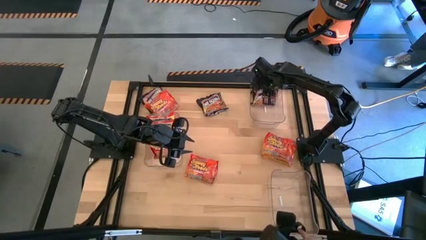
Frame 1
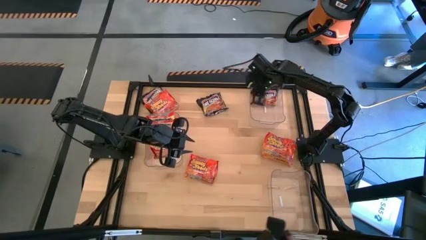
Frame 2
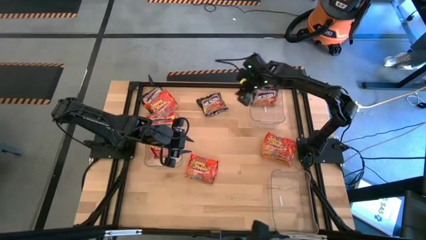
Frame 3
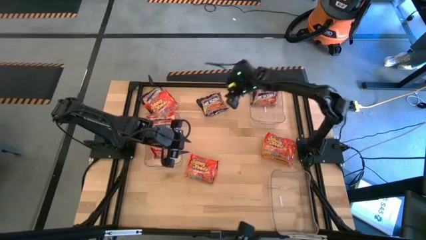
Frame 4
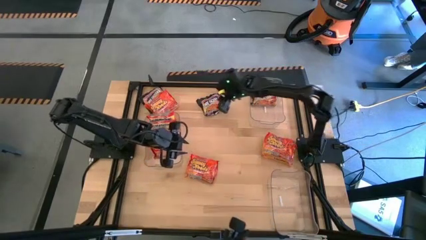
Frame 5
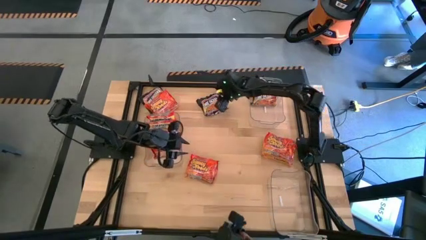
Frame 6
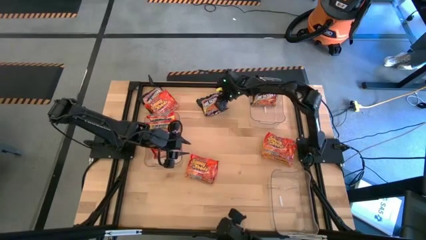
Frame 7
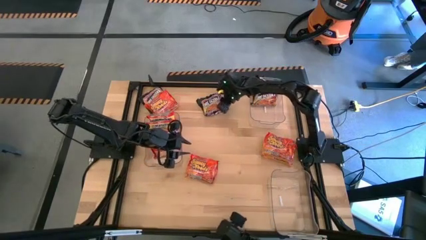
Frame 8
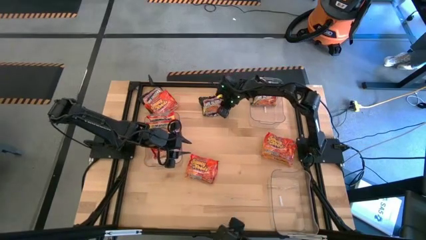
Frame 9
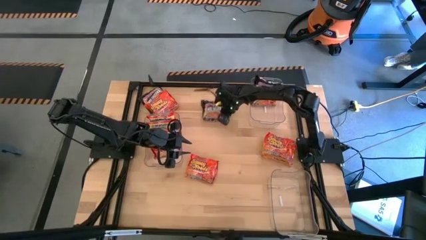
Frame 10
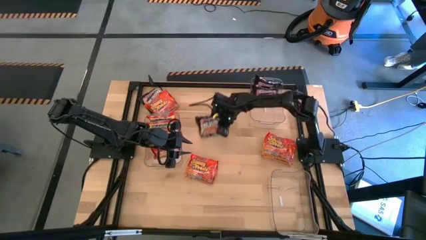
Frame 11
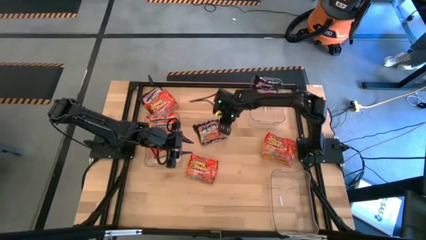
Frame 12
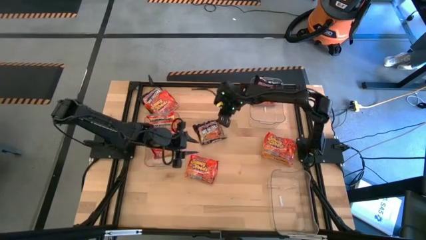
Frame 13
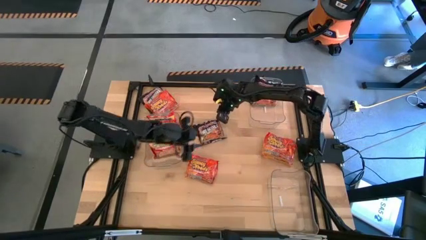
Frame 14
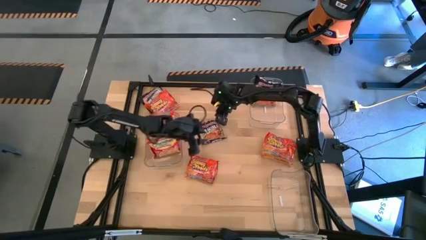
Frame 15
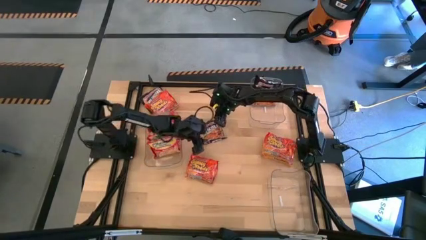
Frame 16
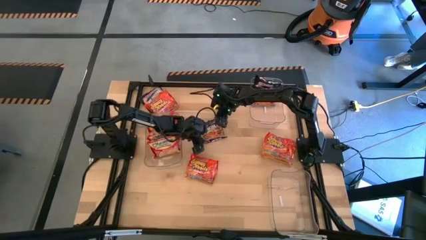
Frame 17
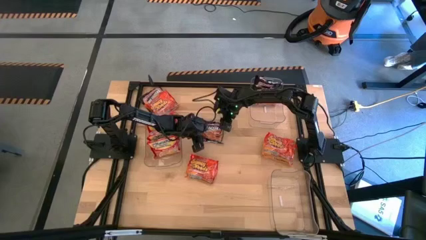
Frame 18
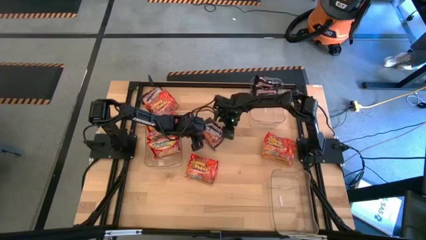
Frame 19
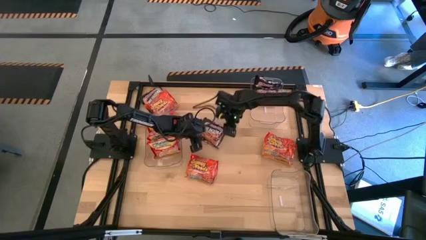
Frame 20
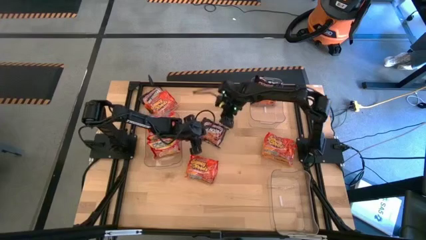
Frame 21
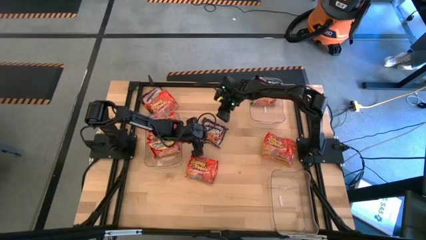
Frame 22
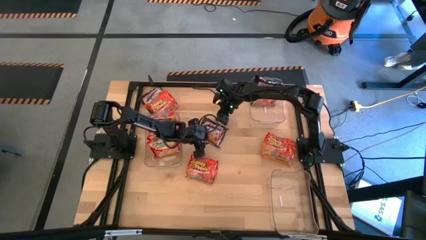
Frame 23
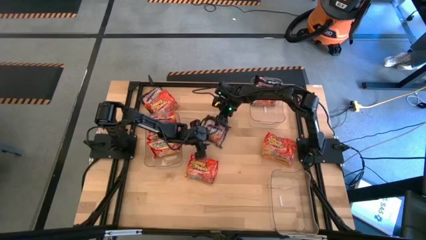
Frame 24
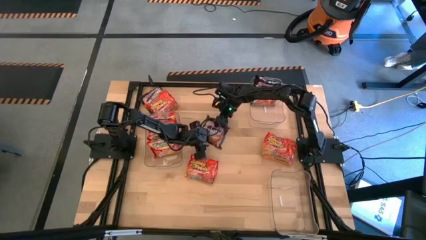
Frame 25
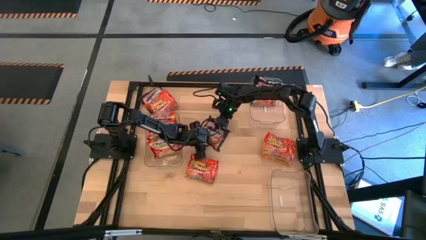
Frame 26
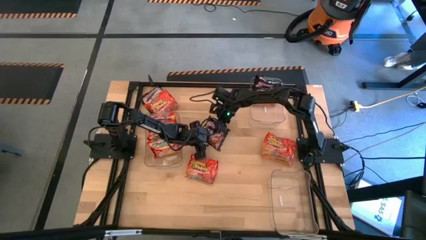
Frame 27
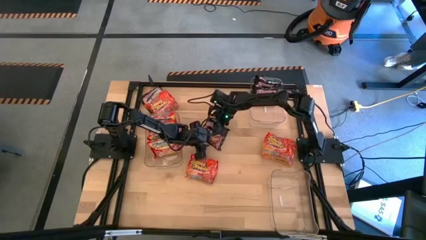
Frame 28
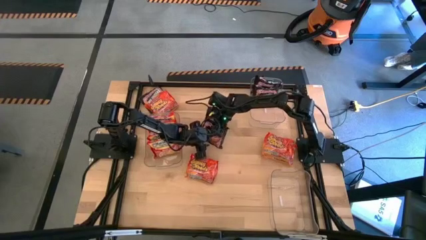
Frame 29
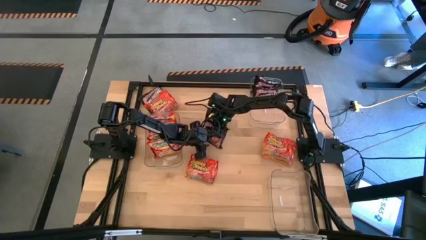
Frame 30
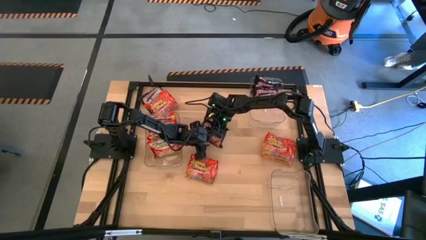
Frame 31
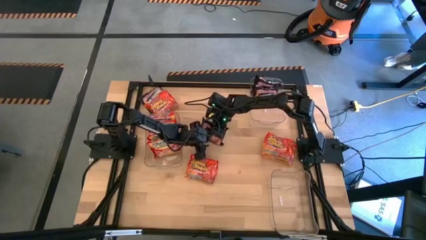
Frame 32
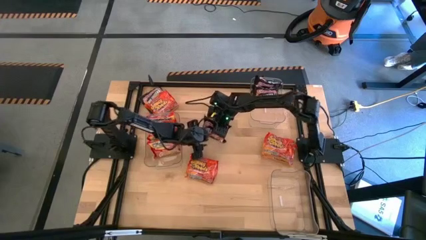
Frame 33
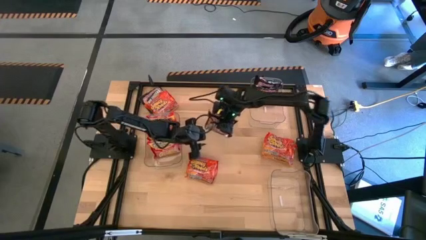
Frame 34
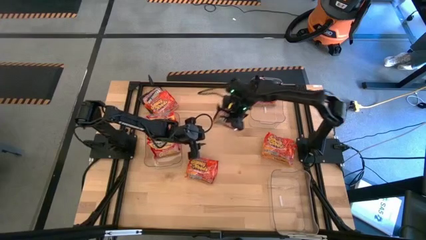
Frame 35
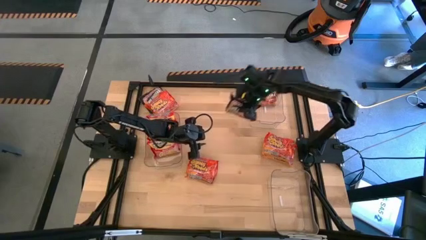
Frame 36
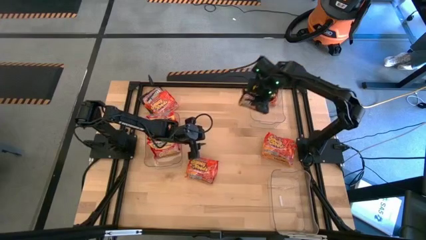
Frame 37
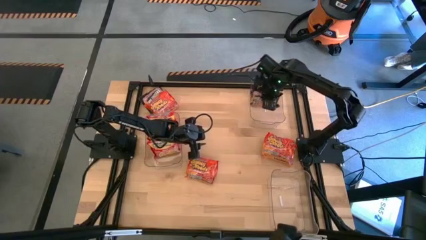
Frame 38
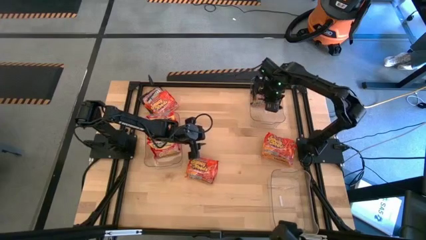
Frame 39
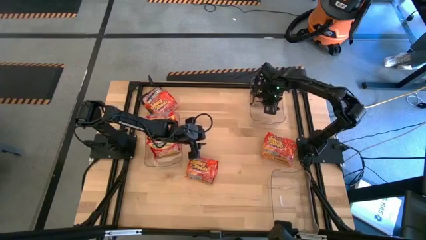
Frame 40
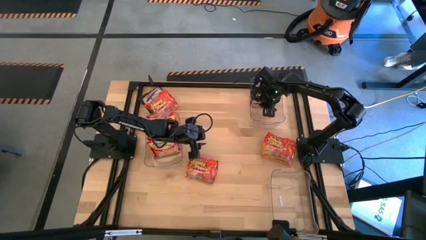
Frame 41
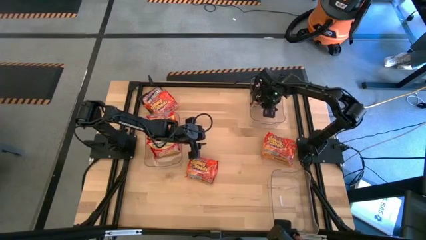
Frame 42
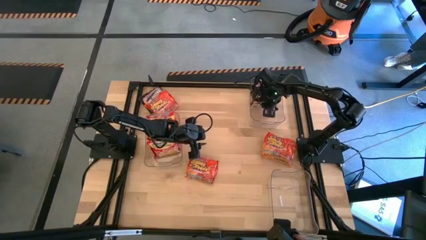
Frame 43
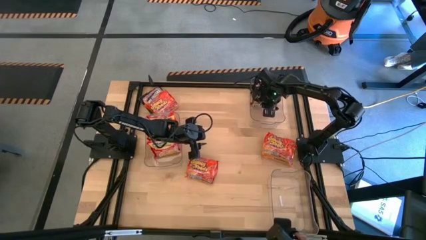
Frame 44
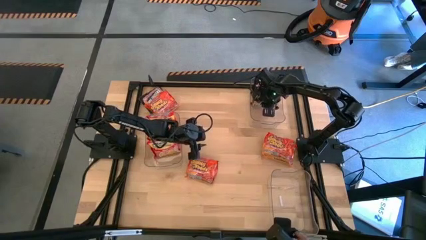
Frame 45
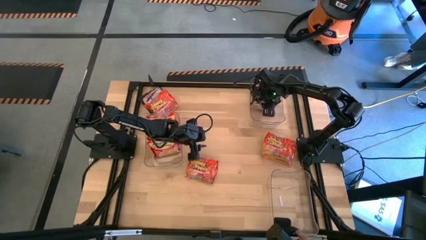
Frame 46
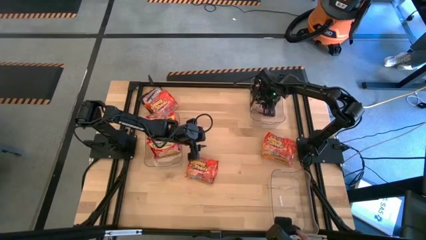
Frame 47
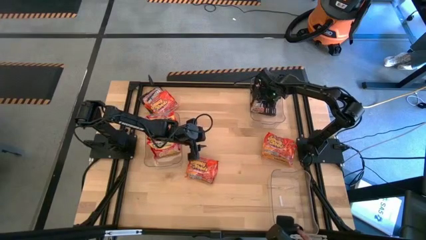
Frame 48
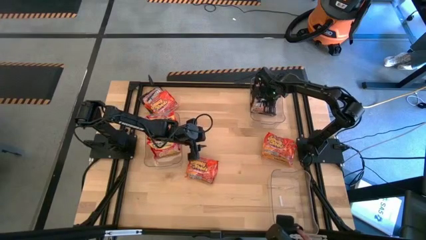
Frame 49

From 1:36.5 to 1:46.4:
Task: Sort Maruchan noodles
Put the black noodle pack into the top transparent bin

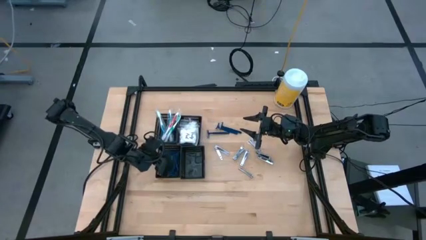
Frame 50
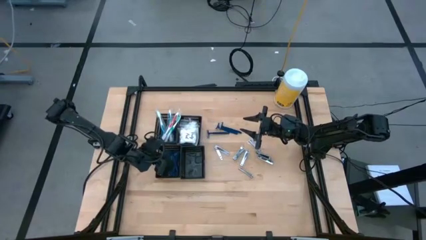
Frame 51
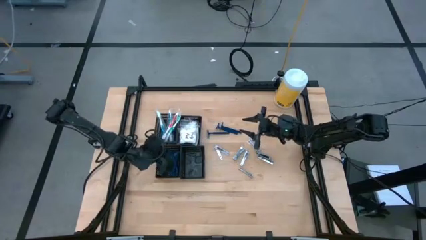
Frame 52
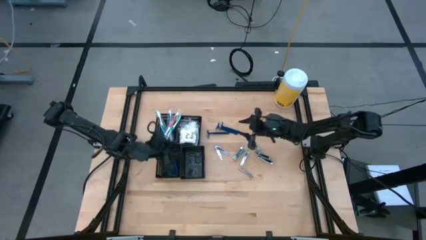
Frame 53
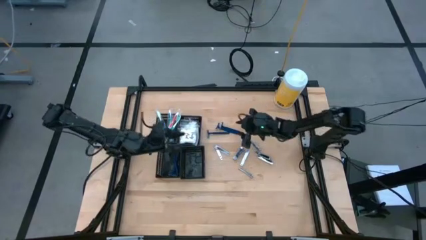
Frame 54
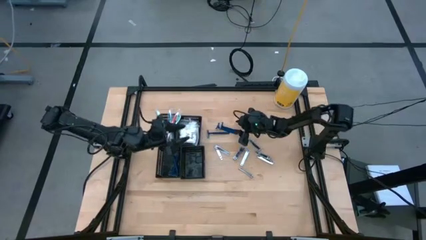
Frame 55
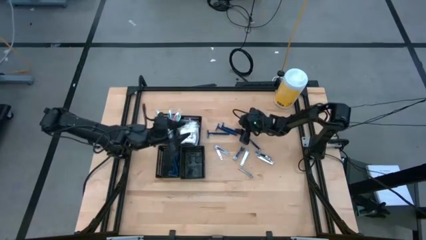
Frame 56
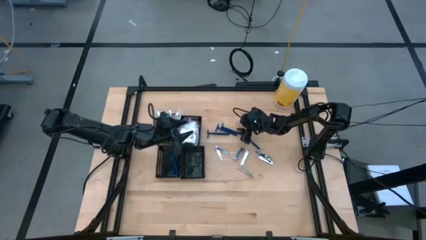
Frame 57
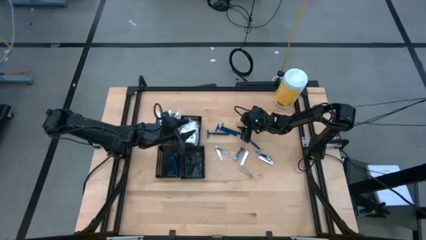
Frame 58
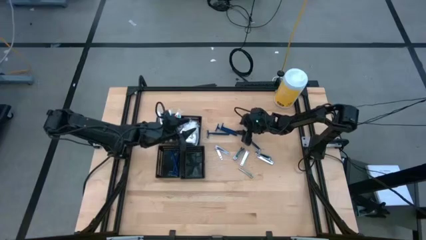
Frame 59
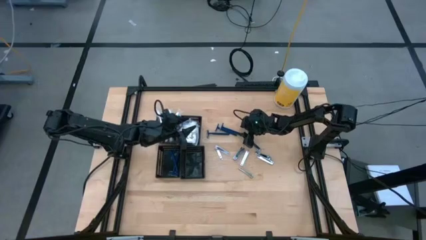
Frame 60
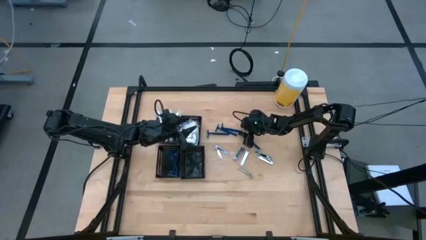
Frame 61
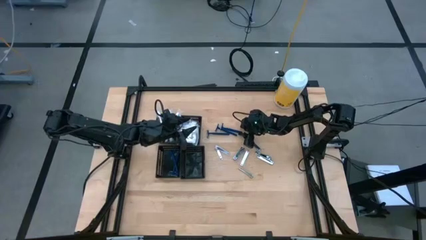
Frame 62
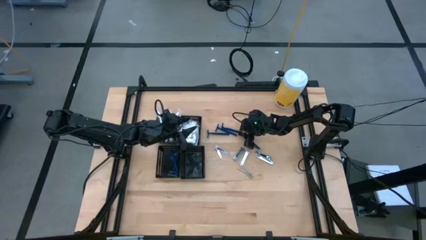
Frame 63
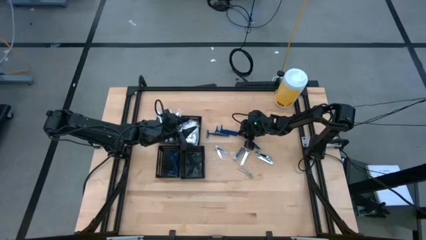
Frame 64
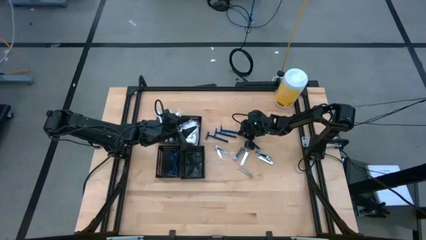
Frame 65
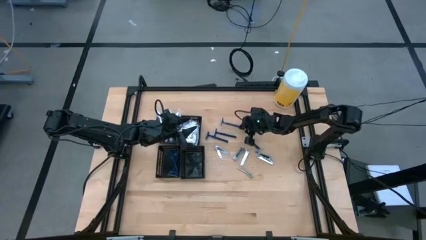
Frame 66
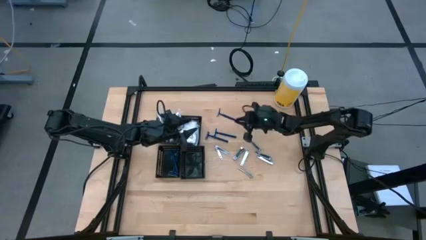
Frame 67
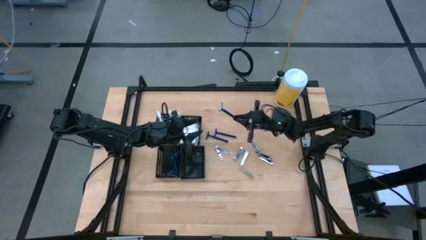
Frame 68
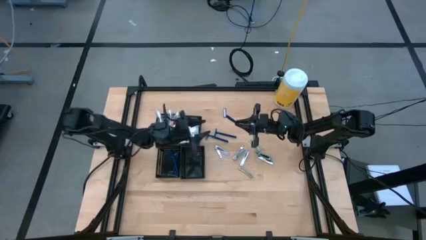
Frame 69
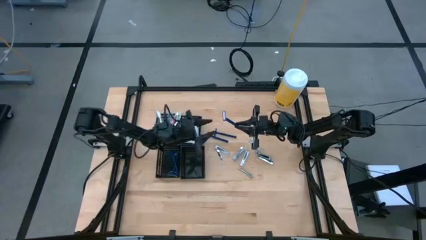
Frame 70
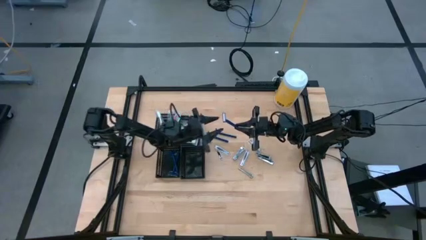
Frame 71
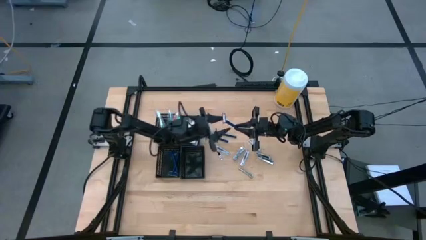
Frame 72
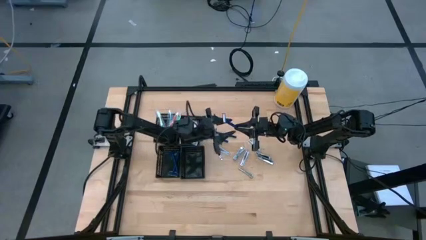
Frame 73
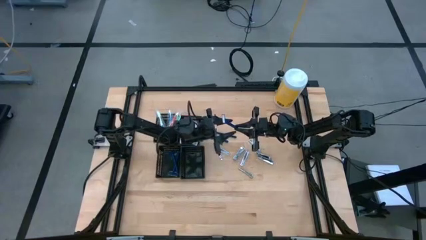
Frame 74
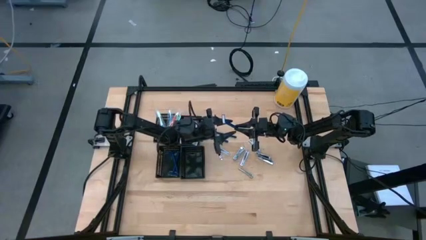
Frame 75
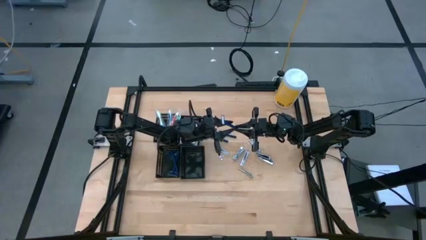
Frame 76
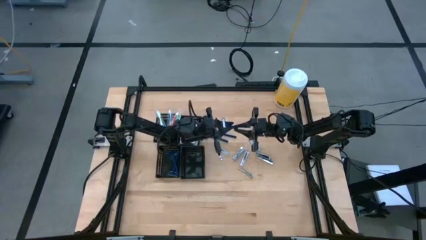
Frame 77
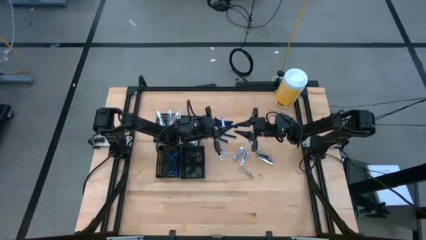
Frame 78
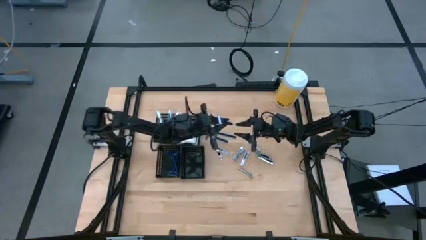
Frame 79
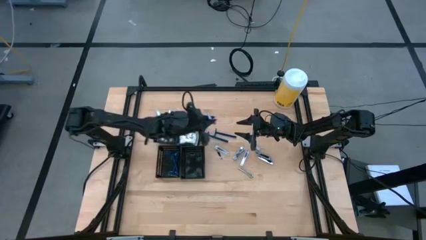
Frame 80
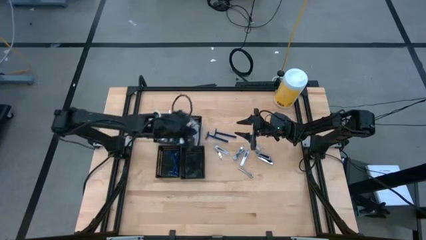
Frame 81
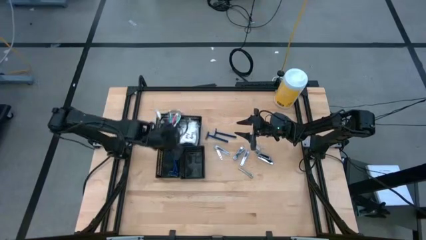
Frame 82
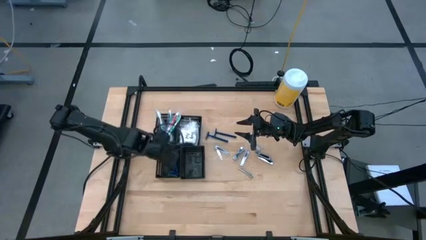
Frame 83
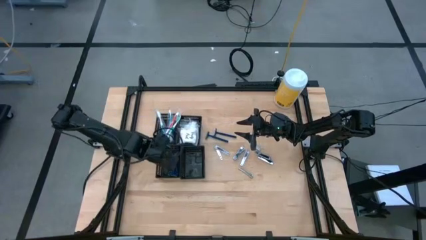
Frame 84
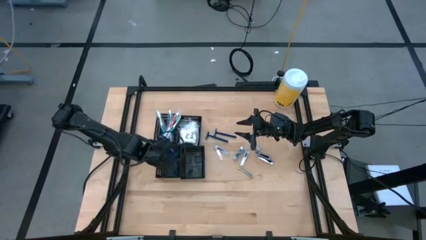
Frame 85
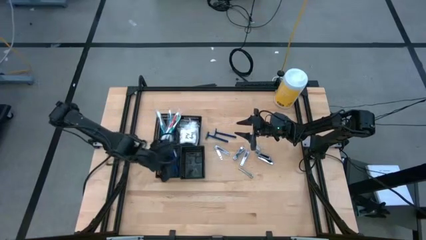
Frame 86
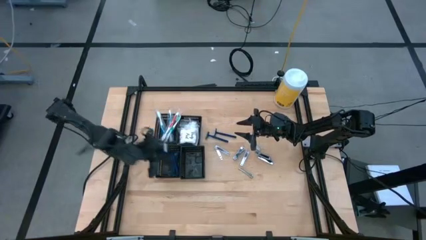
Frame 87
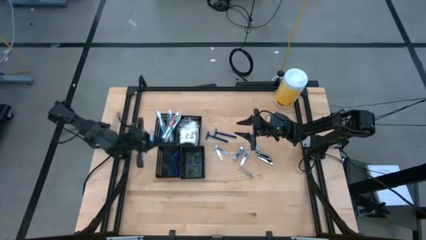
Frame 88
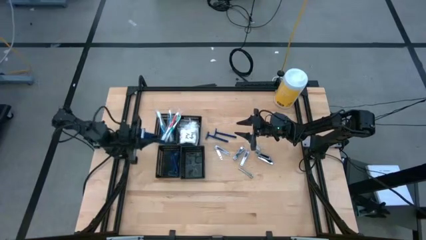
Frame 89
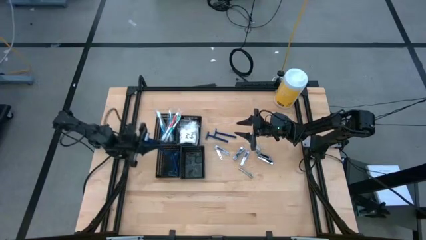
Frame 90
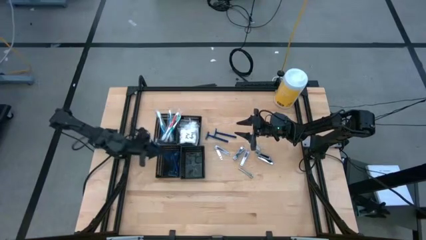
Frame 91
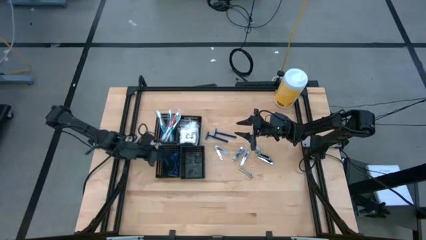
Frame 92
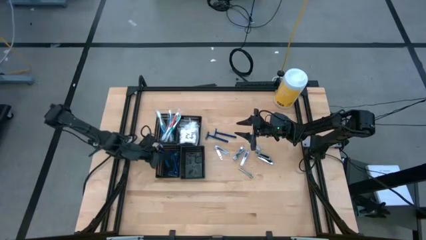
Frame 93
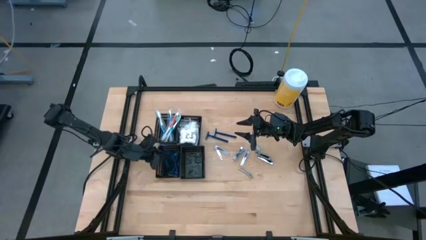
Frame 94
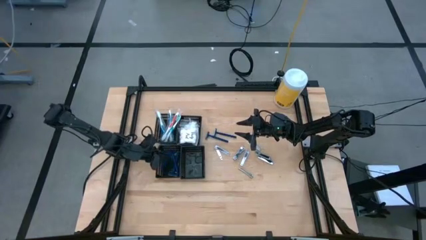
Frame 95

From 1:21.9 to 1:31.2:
Task: Pick & Place Travel size toiletries
Put the blue razor into the bottom left black bin
